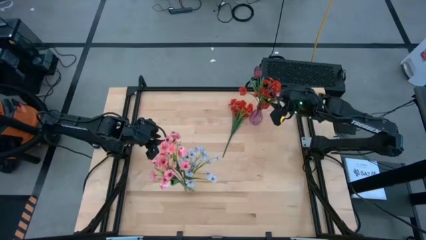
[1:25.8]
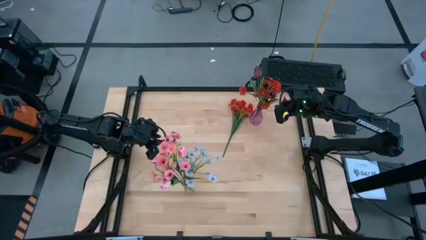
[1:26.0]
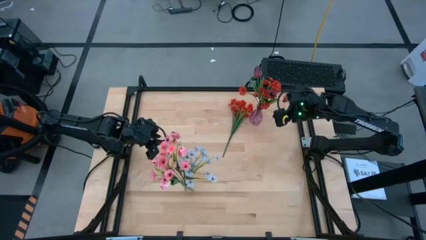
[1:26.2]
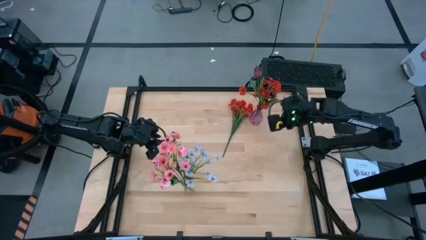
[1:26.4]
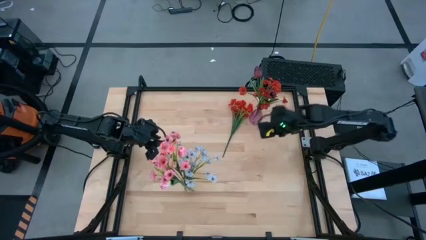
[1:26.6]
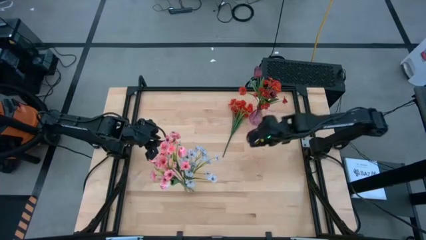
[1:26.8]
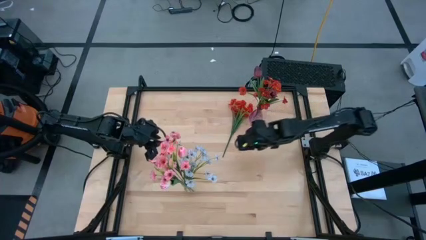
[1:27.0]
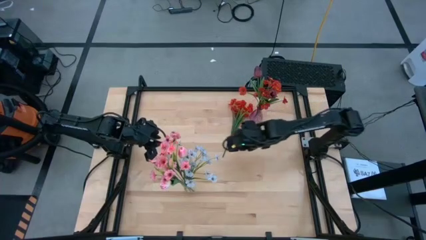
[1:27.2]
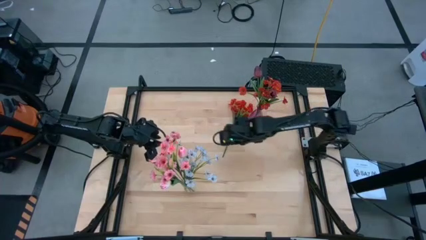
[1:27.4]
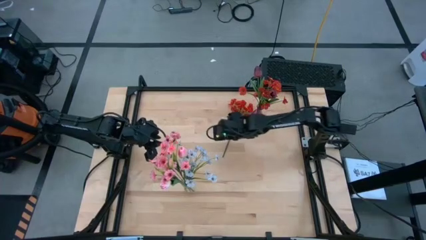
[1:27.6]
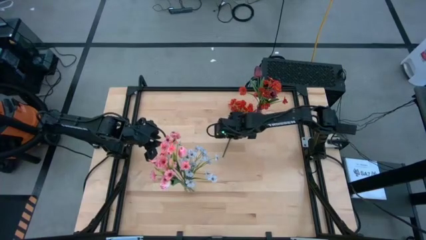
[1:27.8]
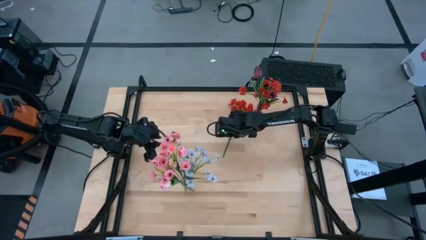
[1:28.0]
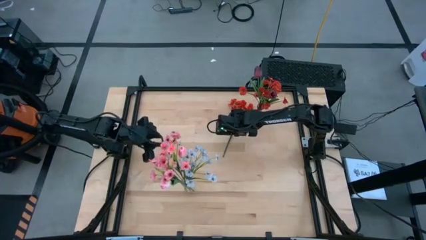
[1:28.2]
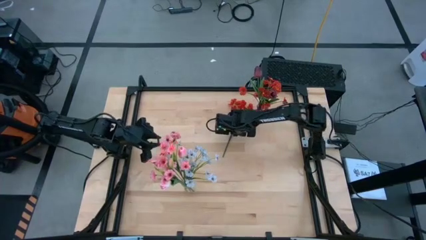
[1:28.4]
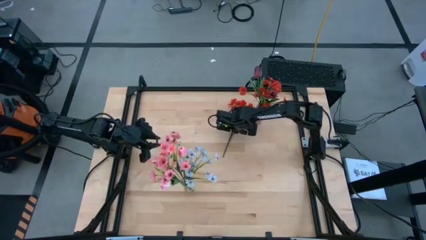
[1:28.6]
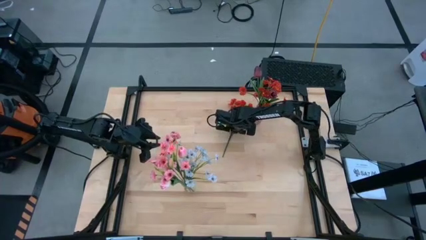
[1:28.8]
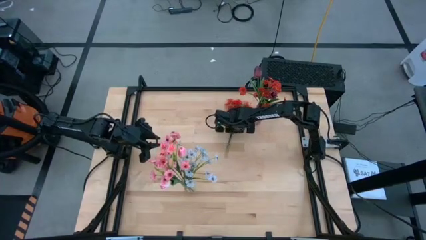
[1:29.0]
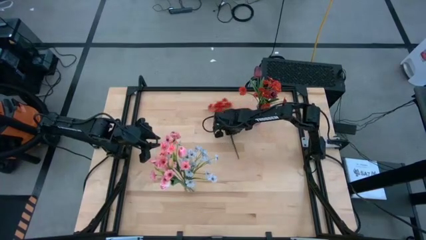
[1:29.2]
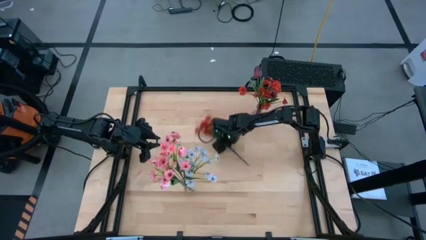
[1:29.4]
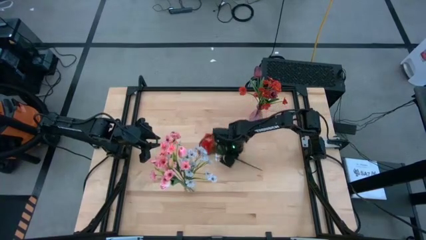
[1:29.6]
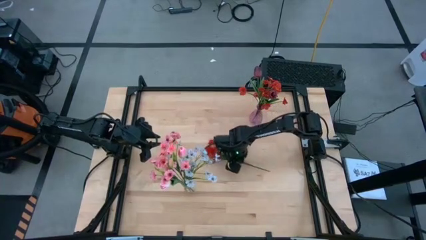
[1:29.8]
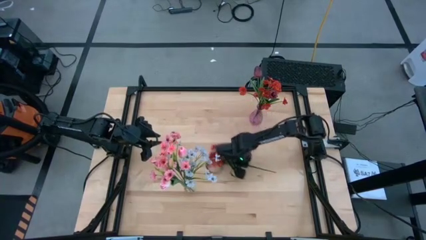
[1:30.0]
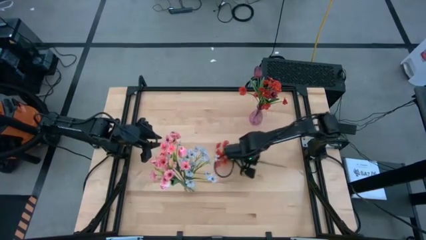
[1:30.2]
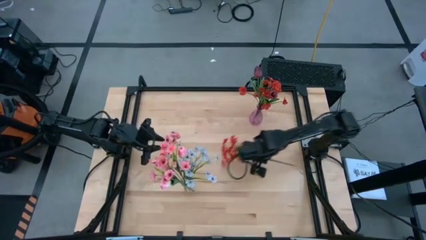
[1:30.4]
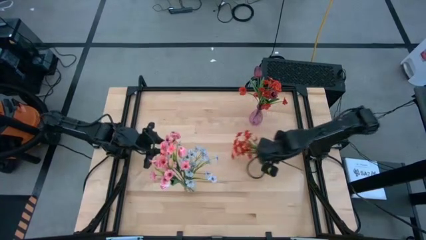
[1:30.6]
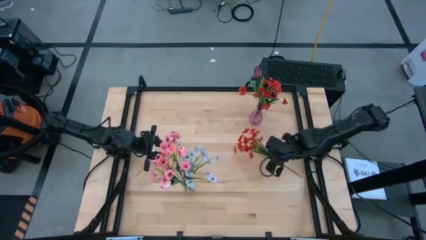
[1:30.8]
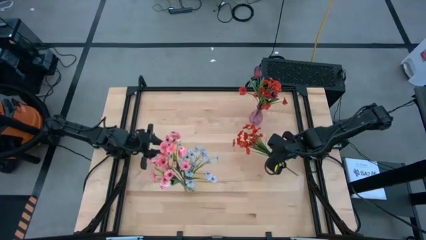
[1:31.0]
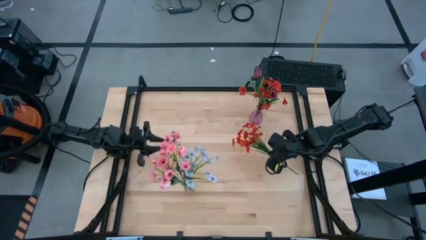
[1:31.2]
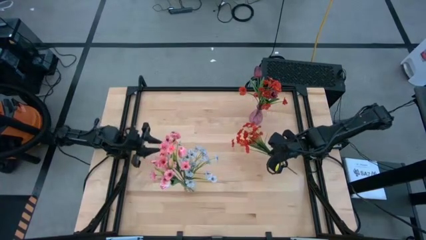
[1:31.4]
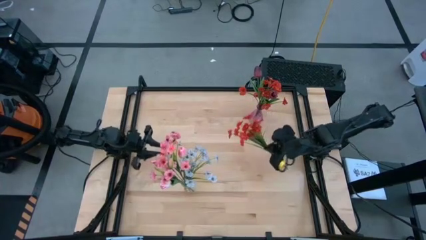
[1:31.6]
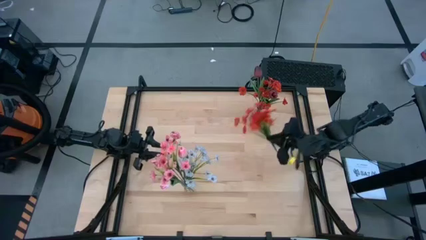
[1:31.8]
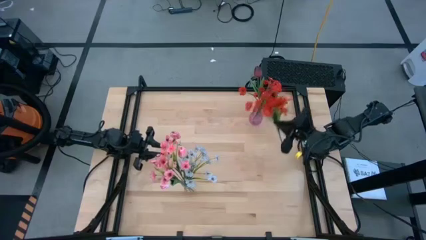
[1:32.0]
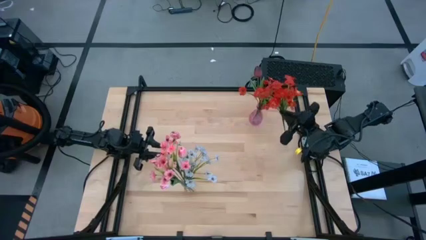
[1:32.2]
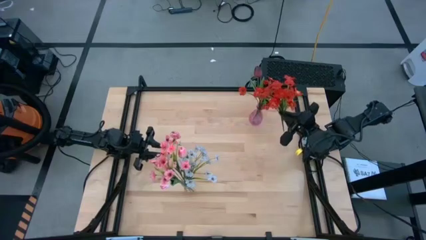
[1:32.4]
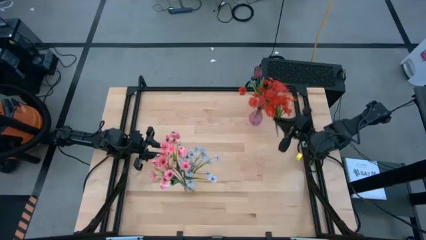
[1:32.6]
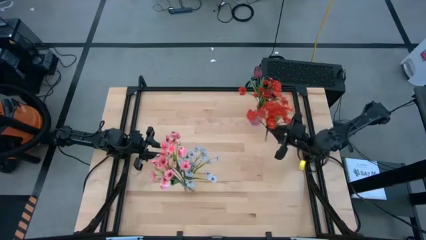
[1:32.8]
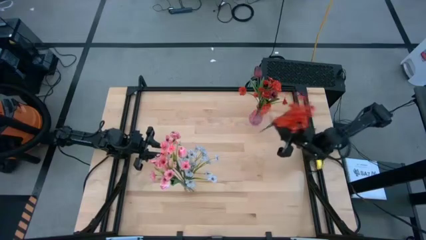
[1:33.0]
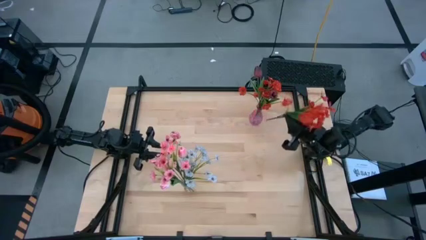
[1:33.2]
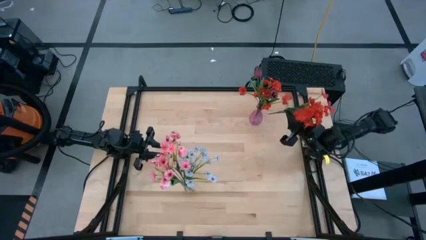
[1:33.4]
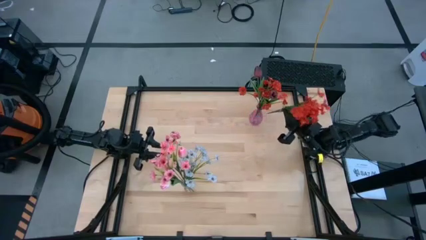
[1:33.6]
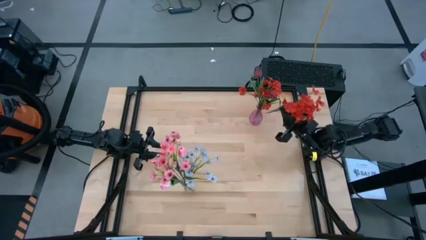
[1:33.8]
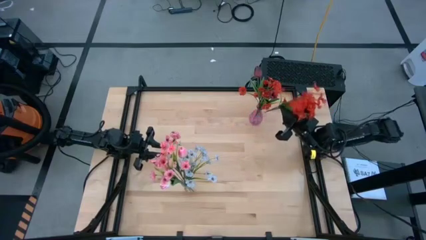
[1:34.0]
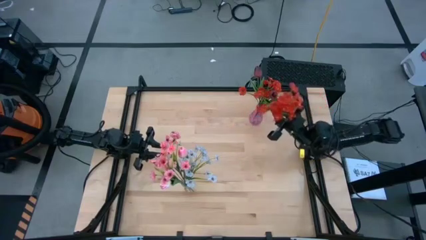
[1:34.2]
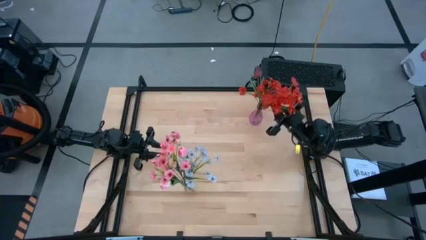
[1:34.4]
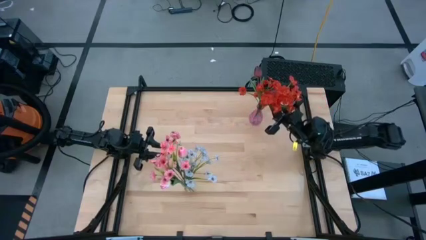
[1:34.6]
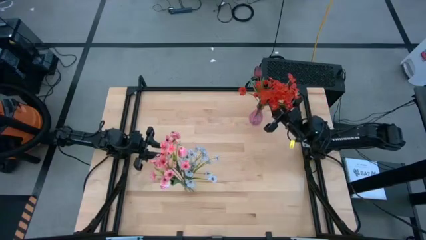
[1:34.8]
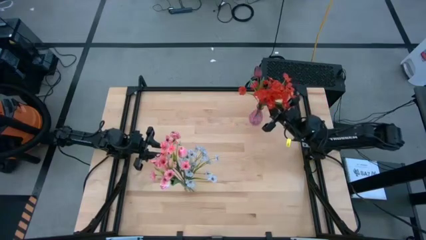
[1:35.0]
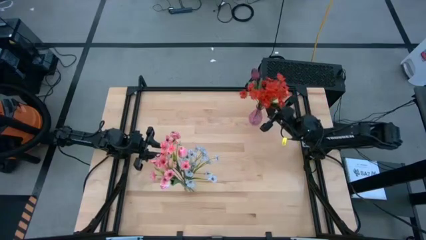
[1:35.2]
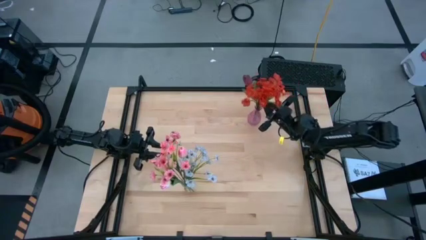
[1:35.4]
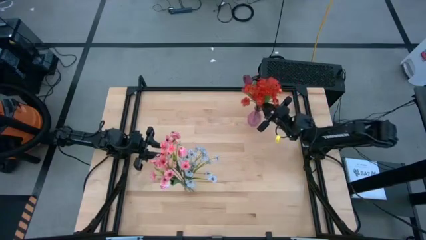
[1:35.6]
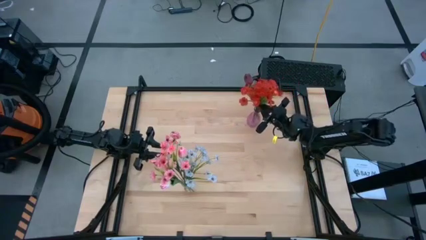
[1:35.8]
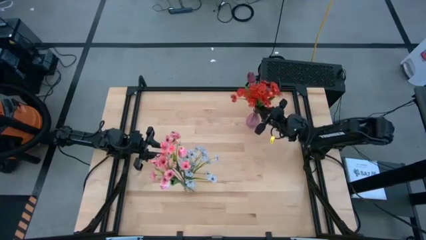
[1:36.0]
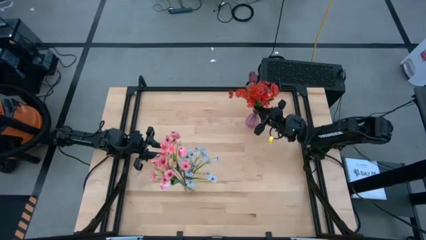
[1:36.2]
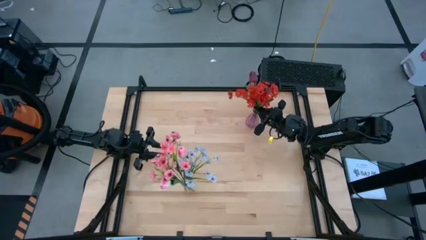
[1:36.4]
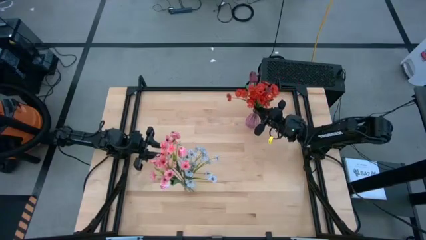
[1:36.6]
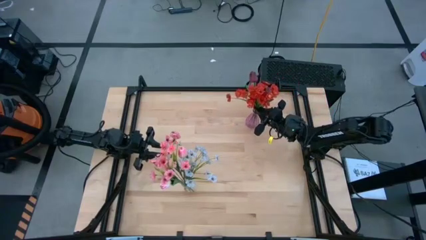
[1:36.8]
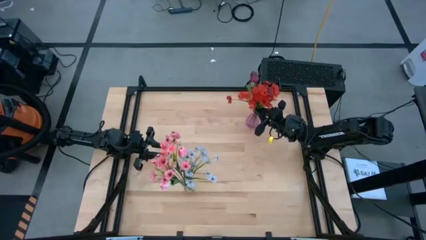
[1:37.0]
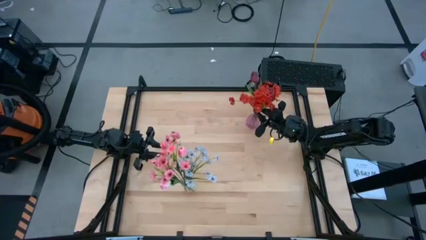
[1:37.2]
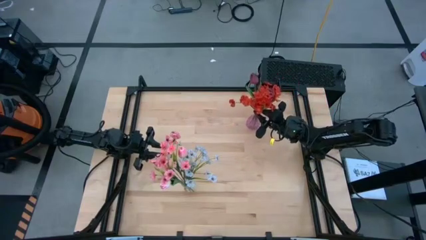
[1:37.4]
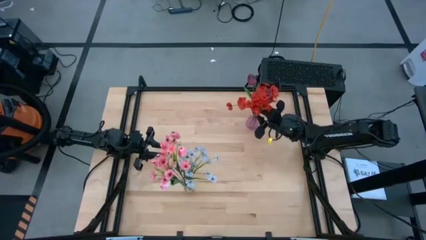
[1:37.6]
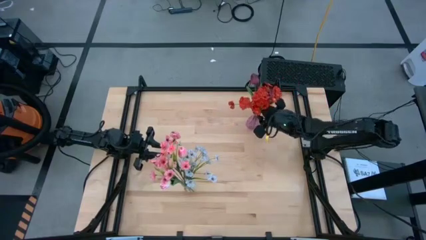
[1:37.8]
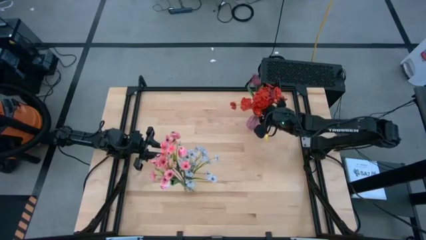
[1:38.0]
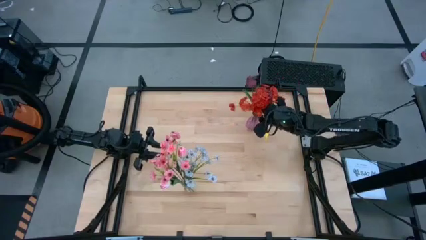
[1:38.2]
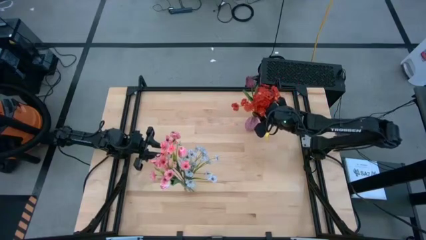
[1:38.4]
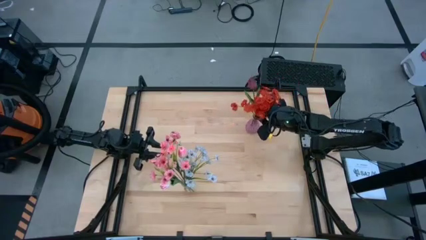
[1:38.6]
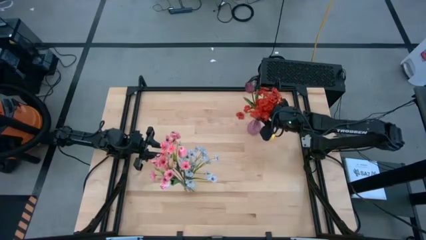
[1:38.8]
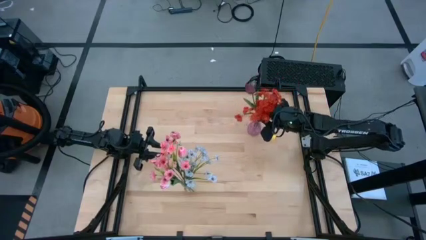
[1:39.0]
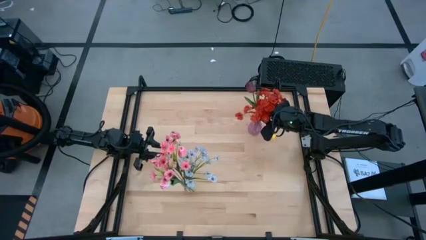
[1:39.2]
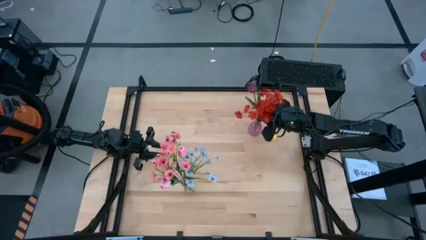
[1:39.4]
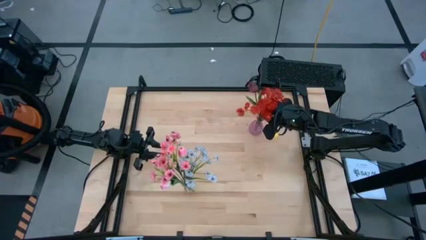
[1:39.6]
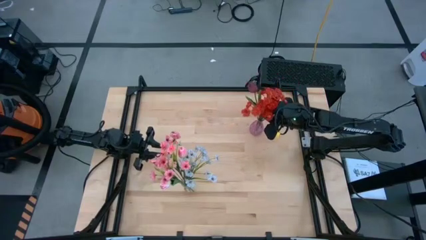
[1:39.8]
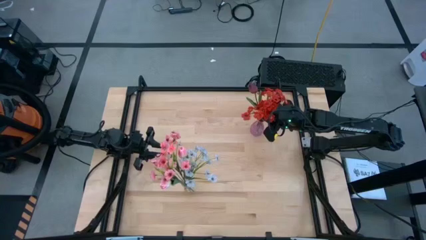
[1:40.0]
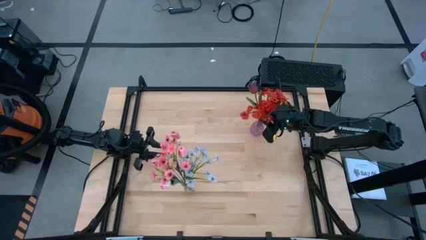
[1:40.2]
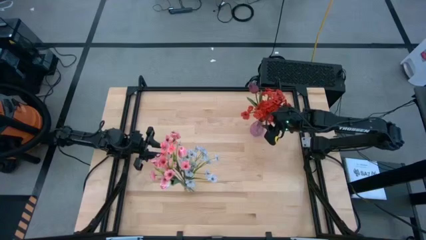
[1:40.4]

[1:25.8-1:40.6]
Task: Sort flowers into vase by color
Put the orange flowers into the purple vase
